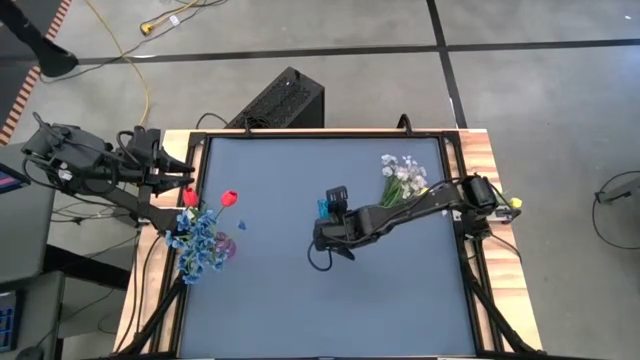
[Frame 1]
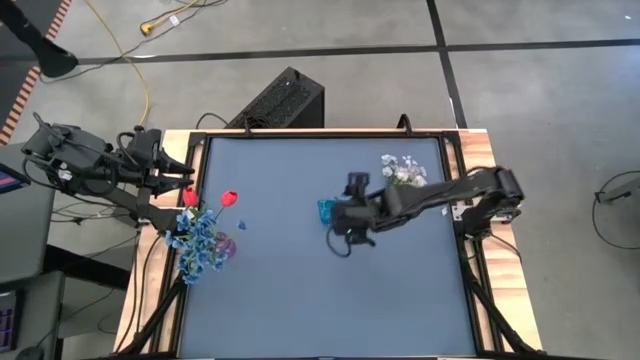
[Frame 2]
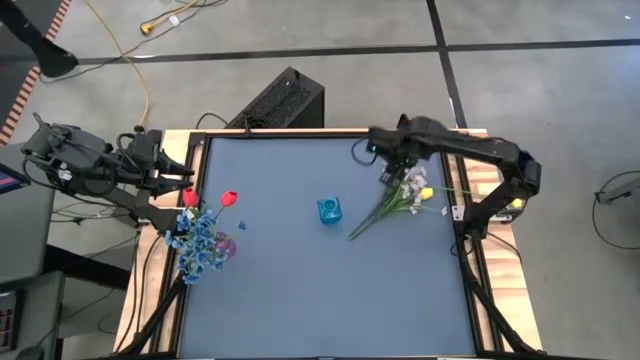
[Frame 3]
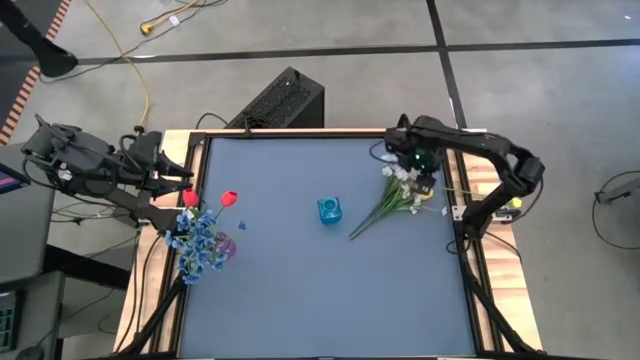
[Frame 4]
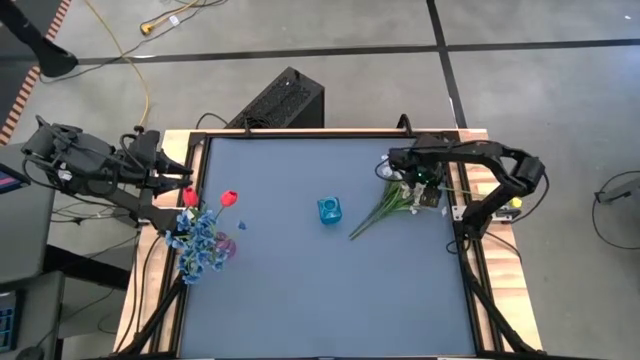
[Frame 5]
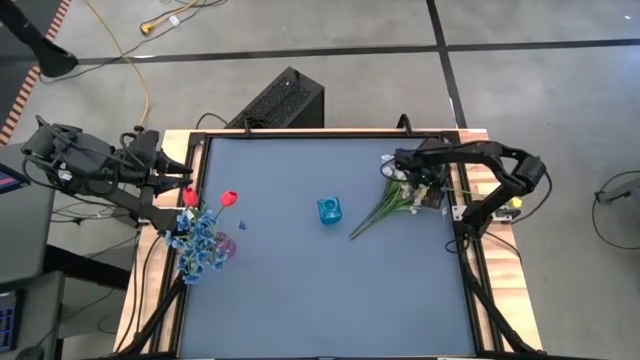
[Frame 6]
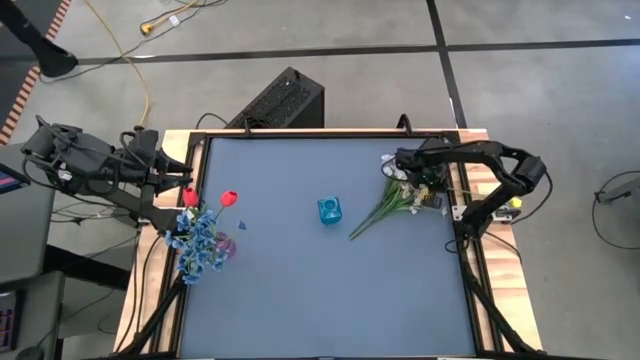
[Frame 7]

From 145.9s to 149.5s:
Task: Sort flowers into vase by color
Put the right yellow tulip into the blue vase

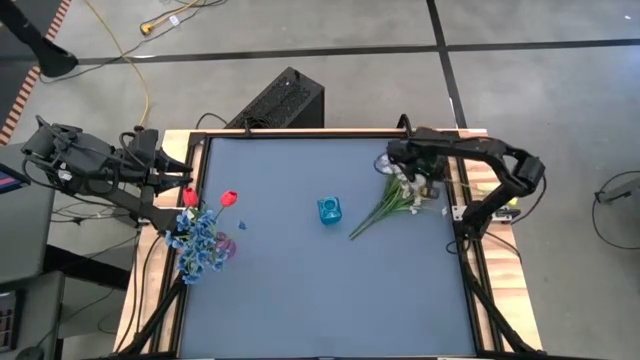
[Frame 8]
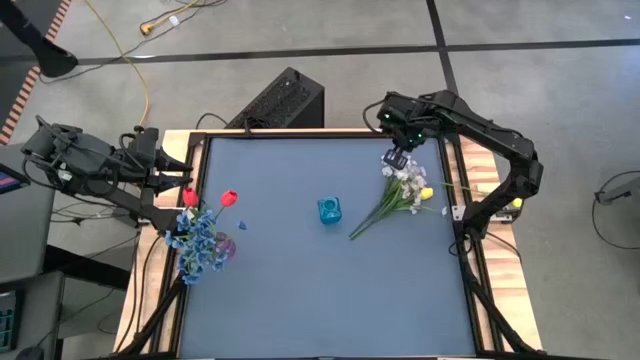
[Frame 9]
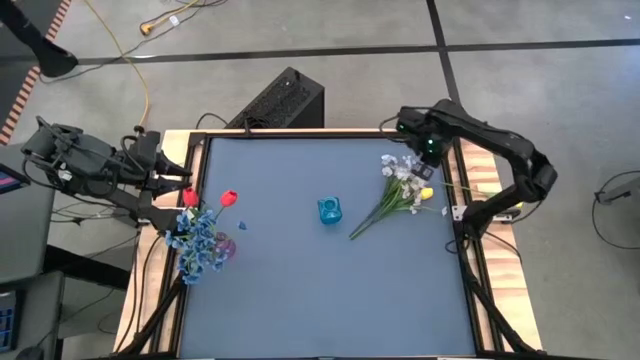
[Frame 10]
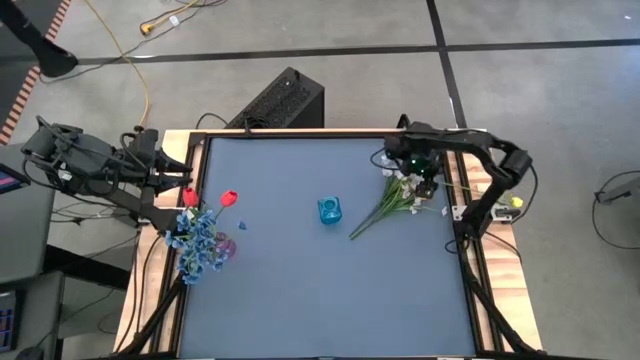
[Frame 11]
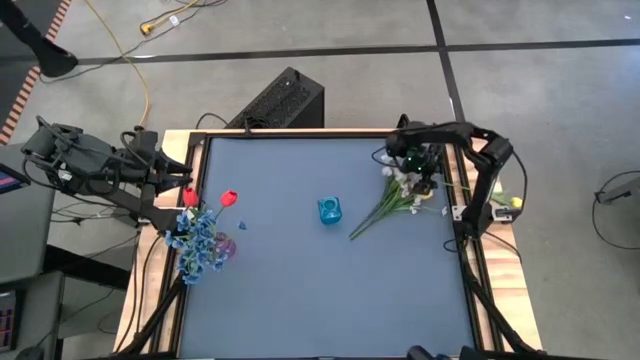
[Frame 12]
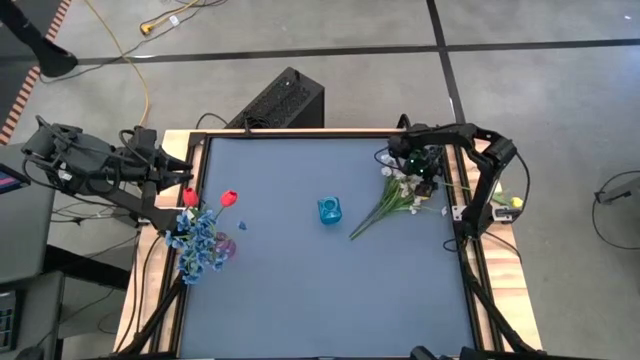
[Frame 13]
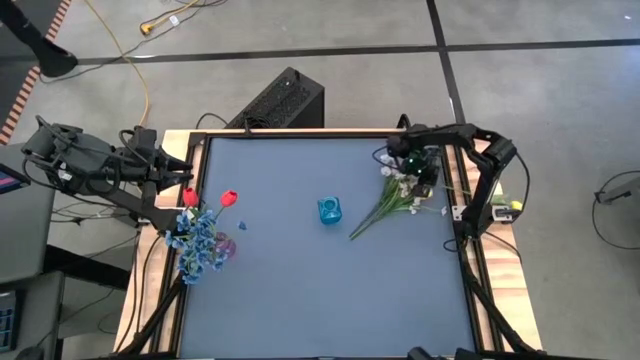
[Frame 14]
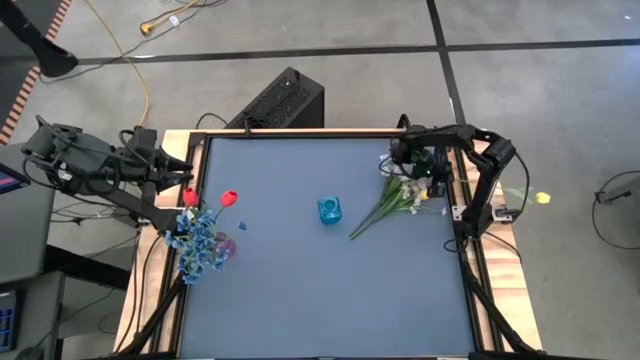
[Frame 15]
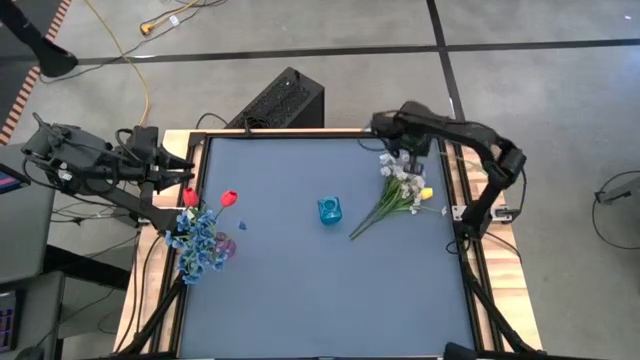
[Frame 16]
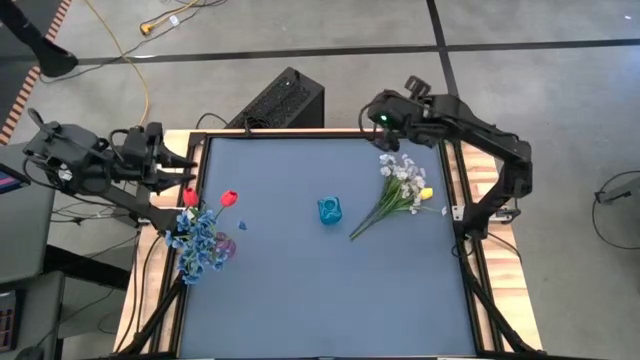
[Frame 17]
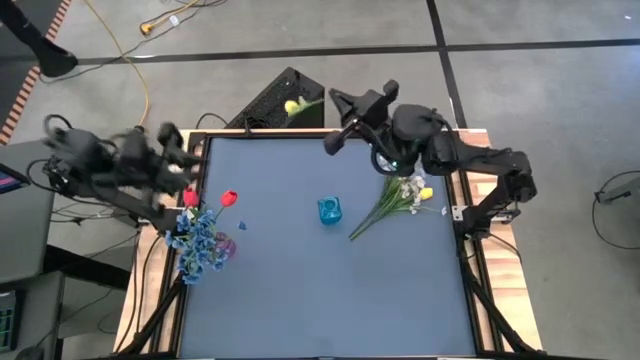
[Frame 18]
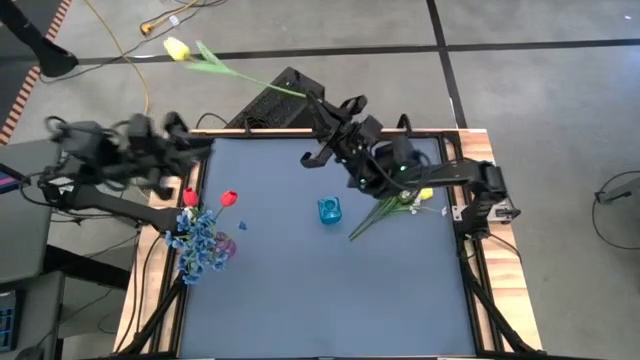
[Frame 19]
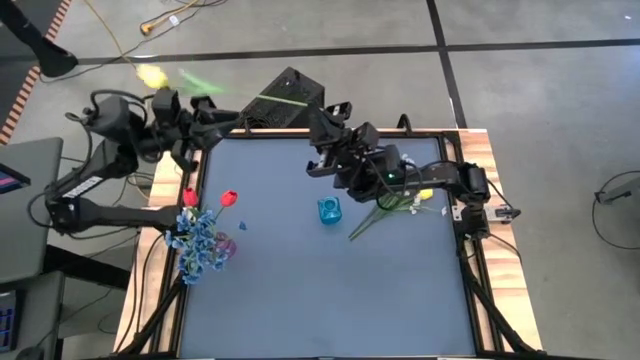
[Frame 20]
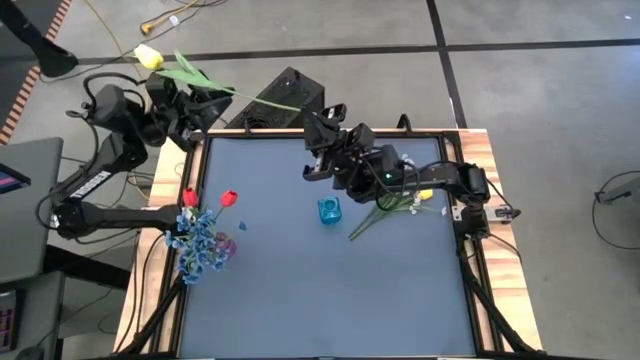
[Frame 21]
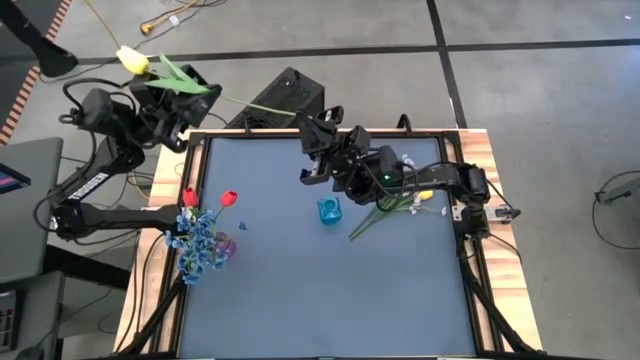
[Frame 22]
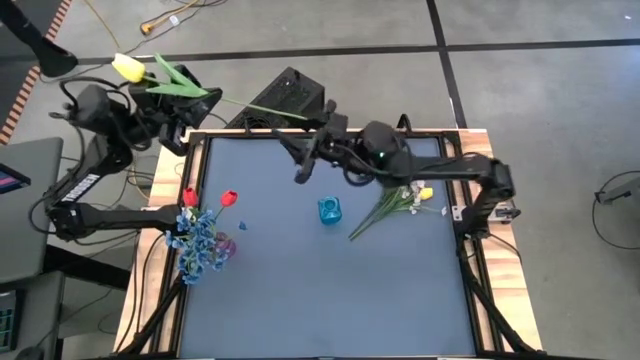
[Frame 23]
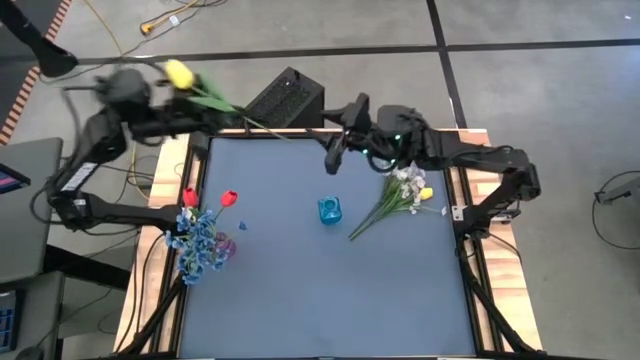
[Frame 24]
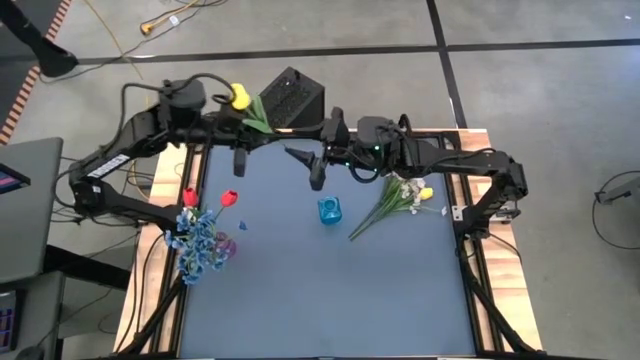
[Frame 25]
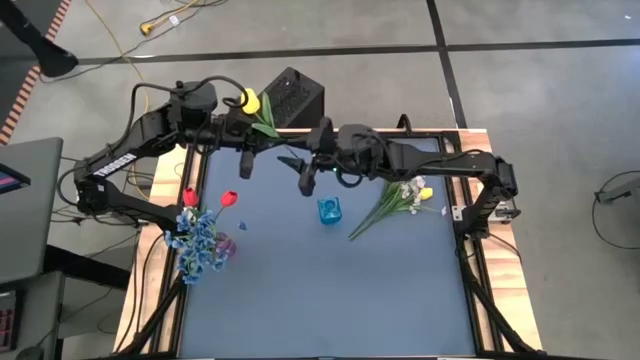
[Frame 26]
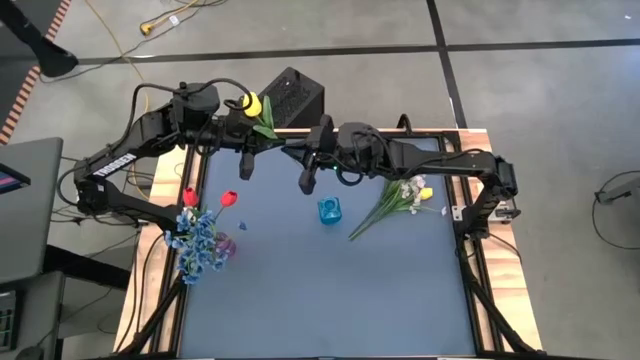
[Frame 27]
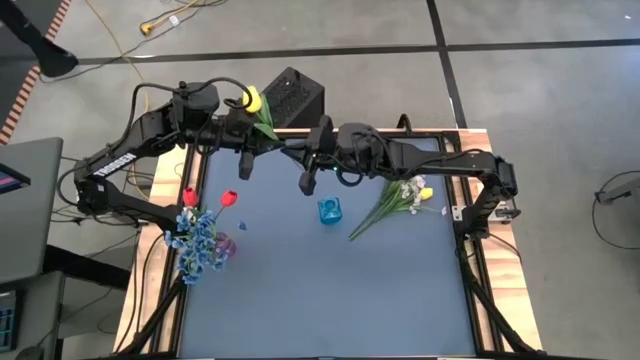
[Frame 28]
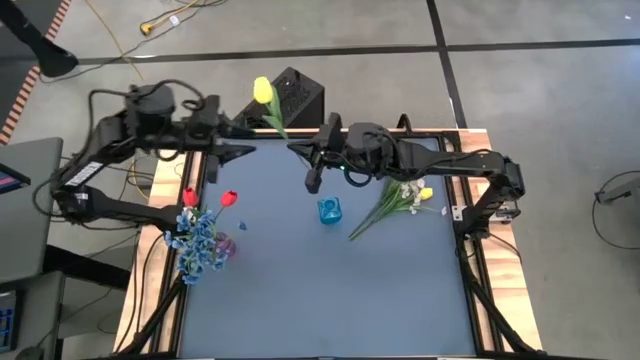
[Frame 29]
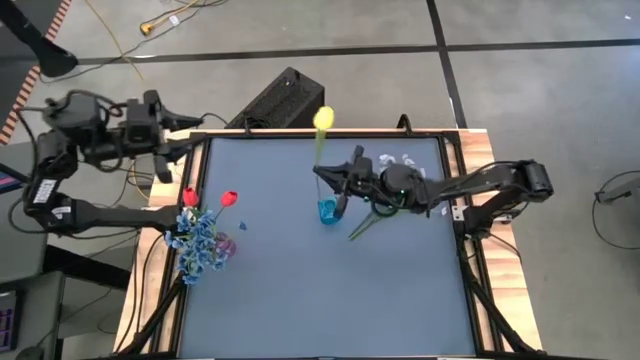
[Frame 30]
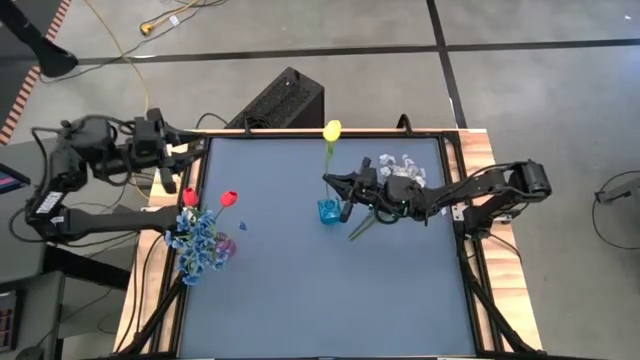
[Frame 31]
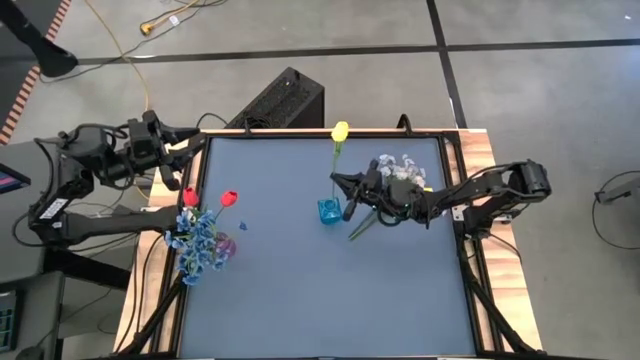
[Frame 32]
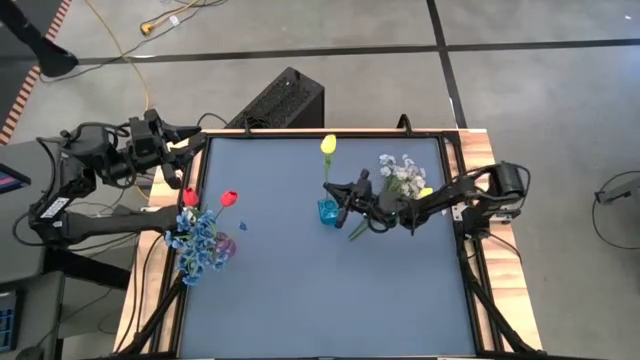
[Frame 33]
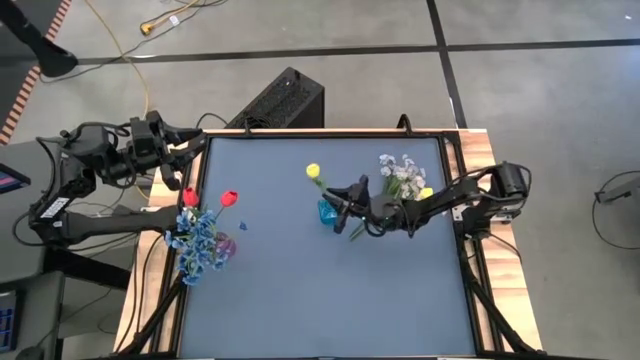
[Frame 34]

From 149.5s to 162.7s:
Put the right yellow tulip into the blue vase

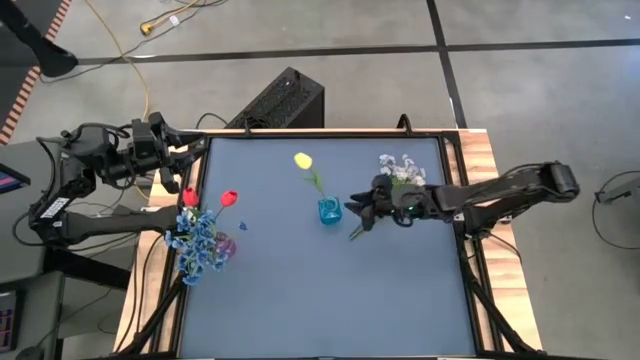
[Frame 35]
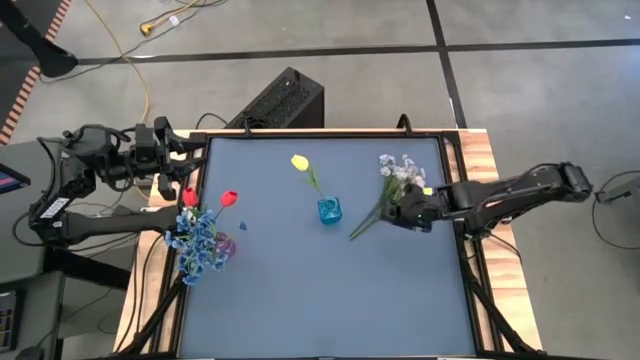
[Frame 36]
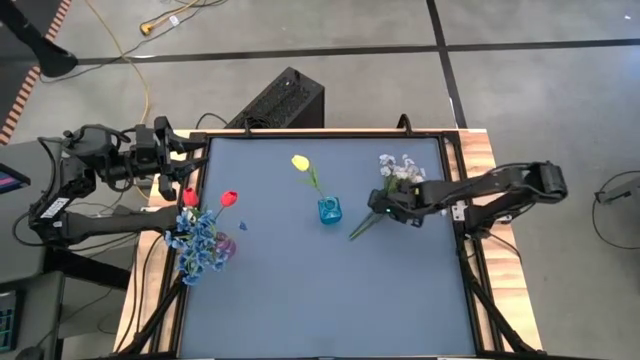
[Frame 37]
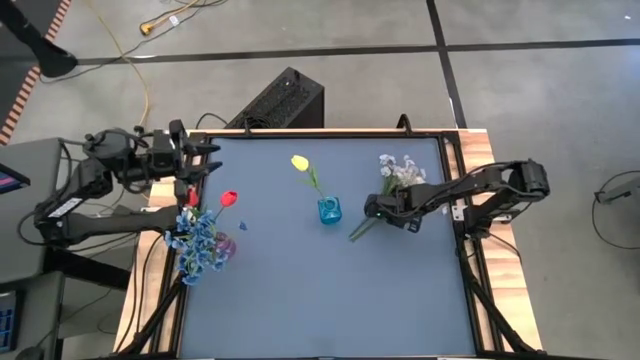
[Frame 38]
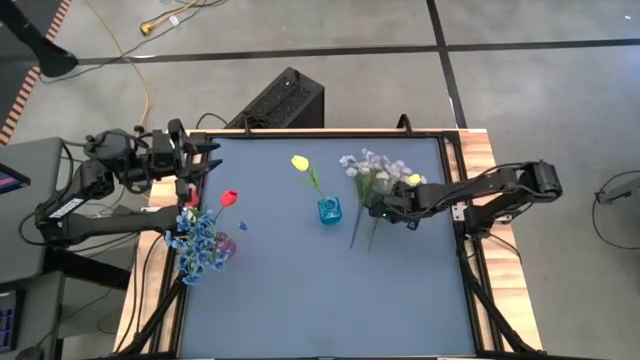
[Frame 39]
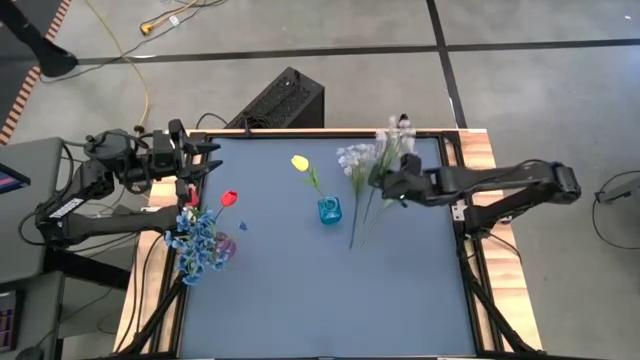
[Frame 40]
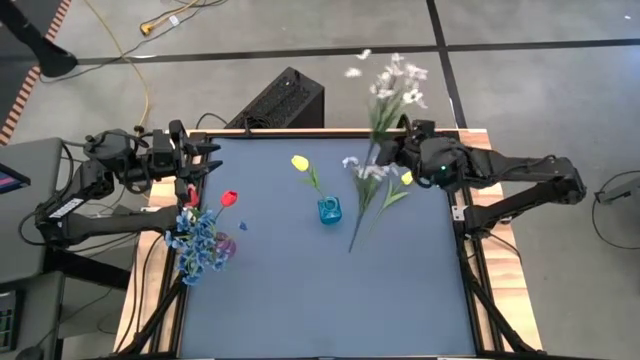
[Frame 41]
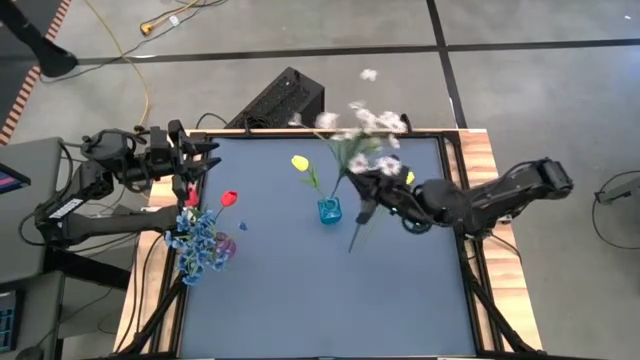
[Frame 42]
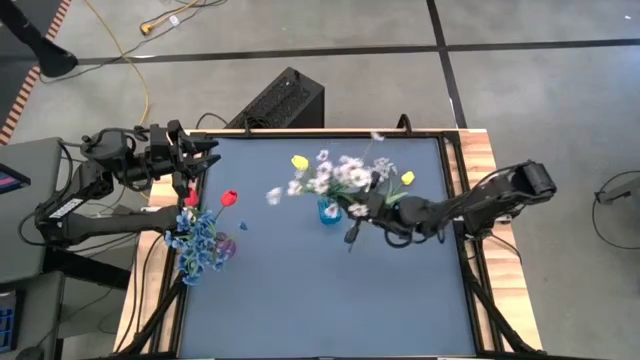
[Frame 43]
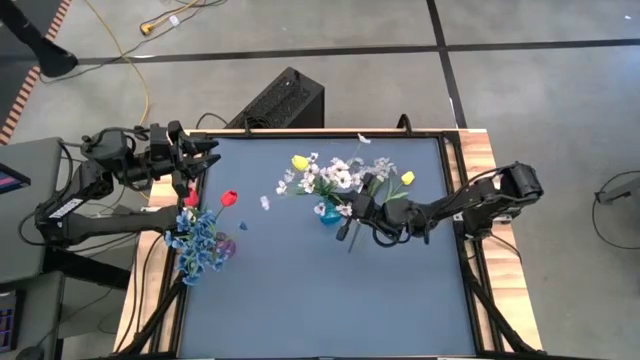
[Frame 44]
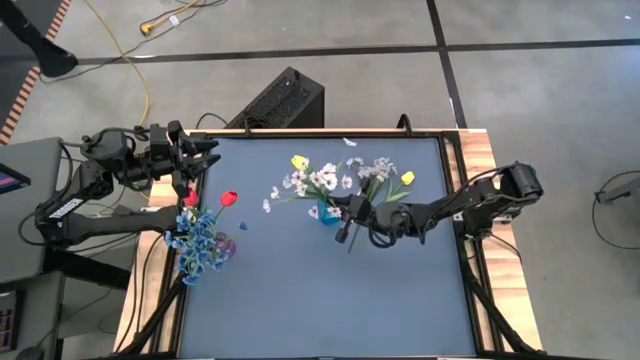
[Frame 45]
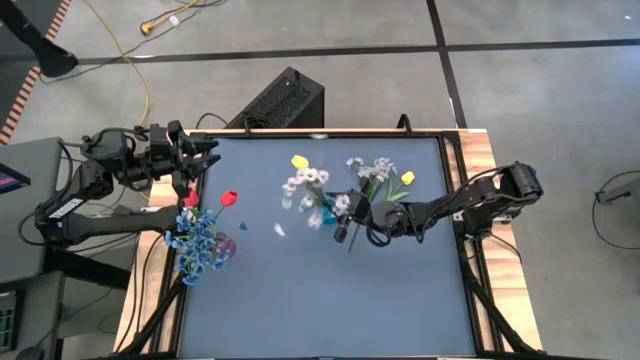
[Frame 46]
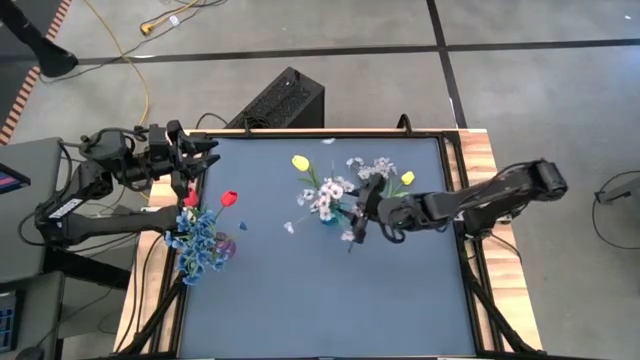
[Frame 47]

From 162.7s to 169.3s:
Put the bottom white flowers into the blue vase
